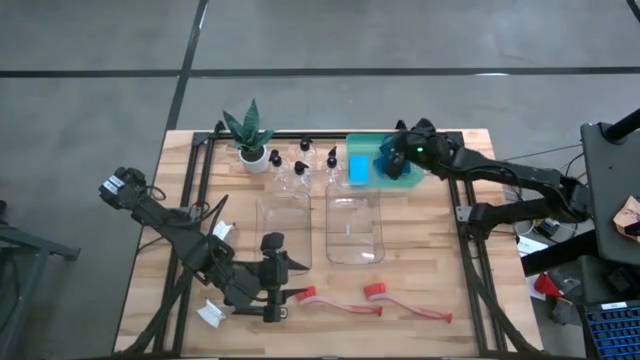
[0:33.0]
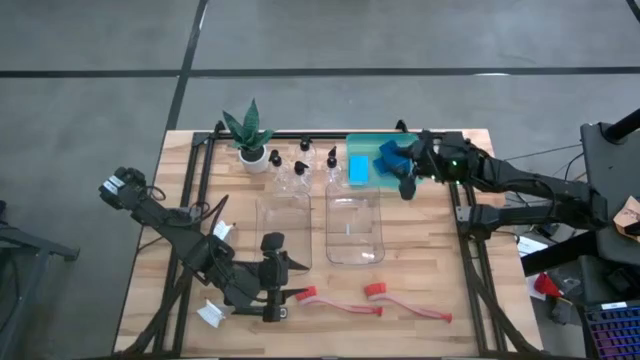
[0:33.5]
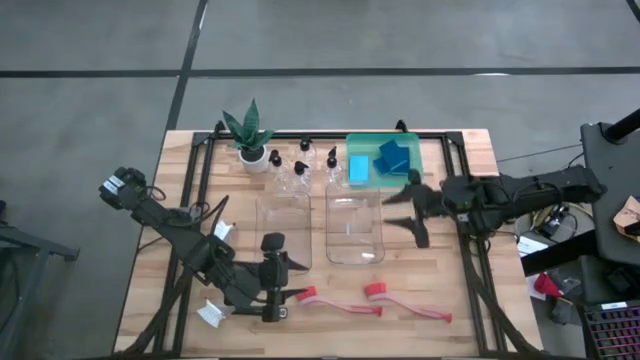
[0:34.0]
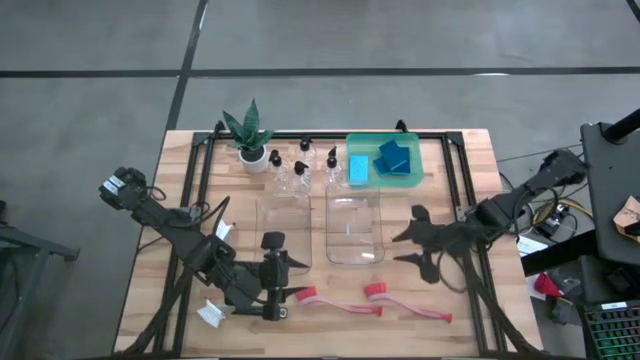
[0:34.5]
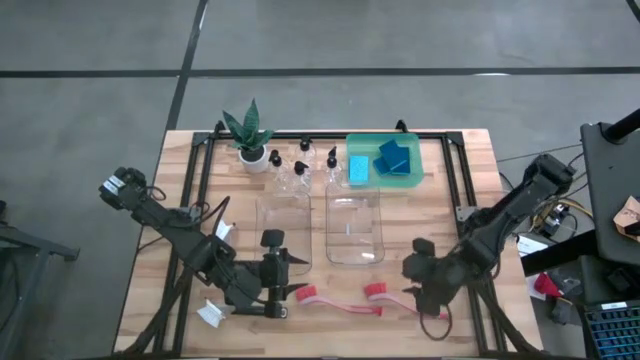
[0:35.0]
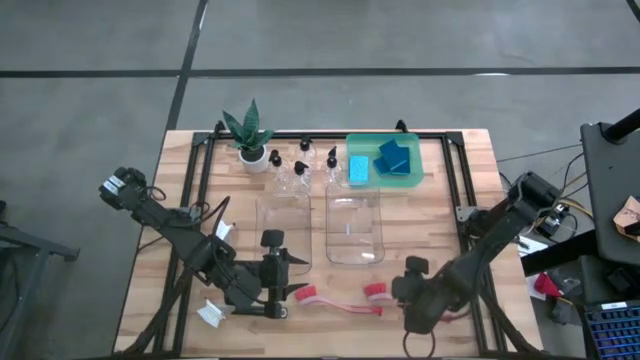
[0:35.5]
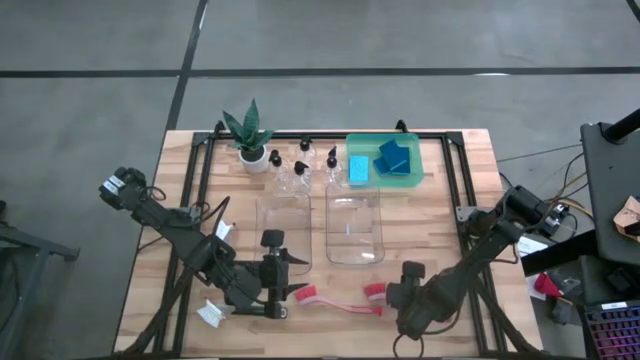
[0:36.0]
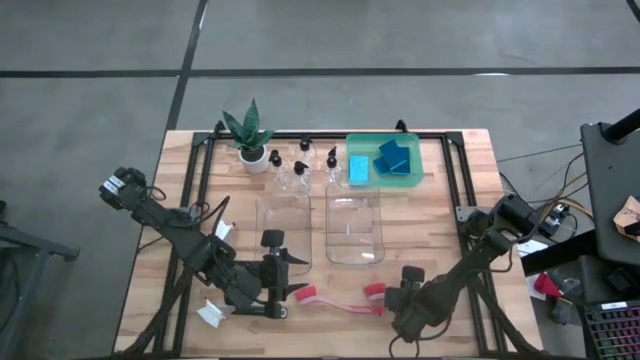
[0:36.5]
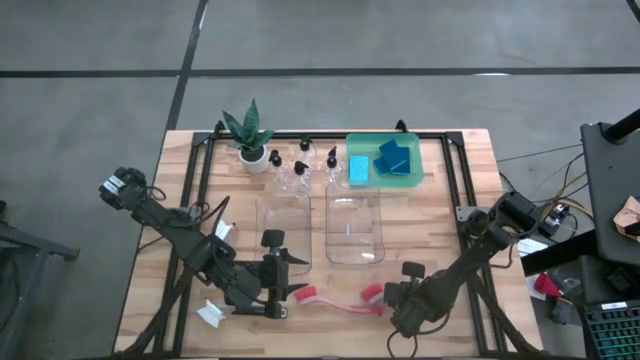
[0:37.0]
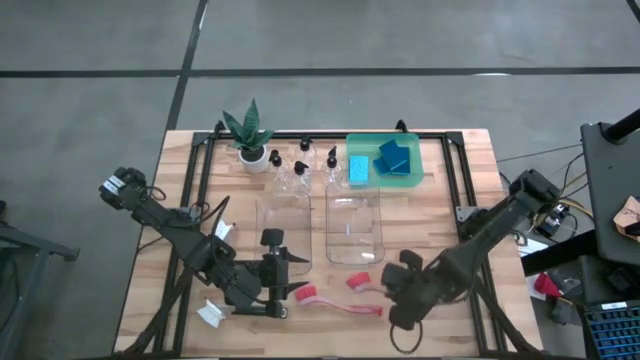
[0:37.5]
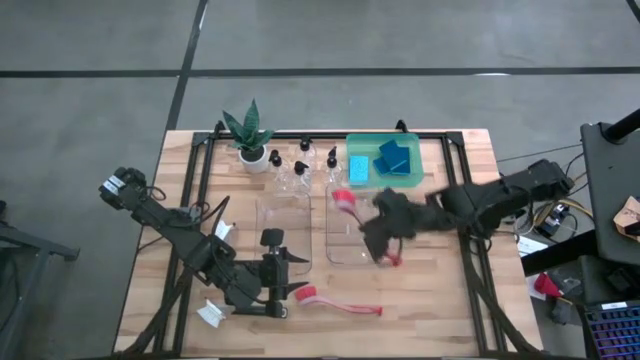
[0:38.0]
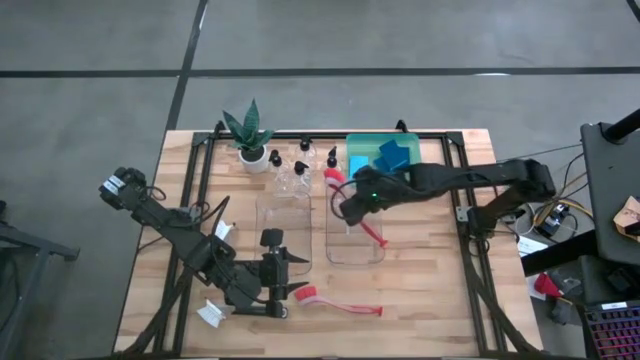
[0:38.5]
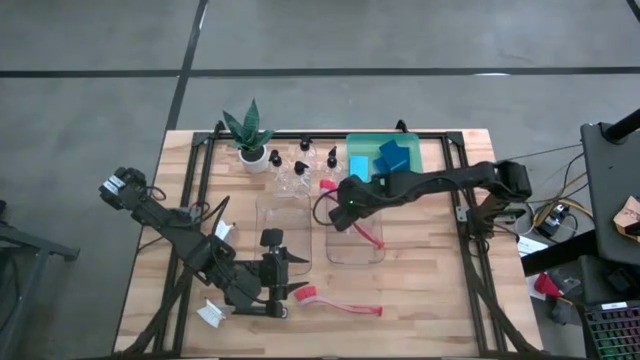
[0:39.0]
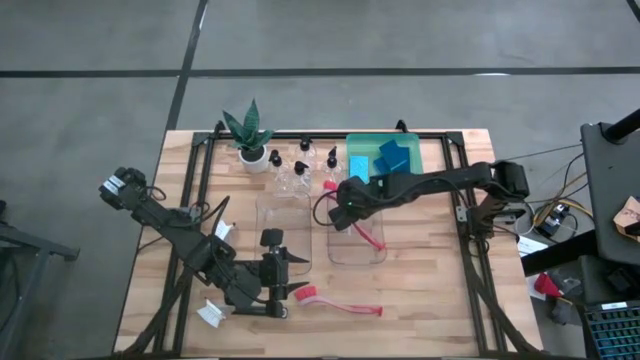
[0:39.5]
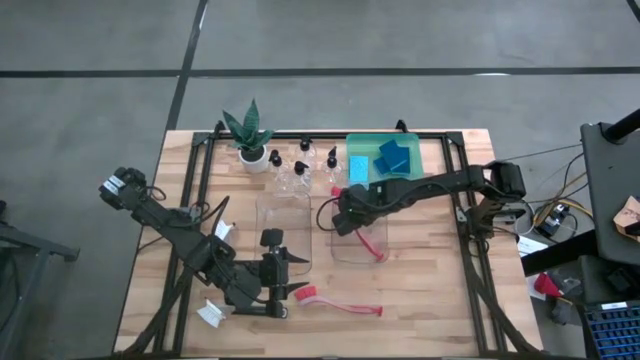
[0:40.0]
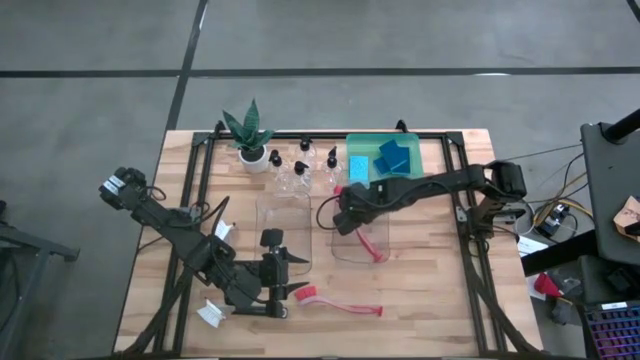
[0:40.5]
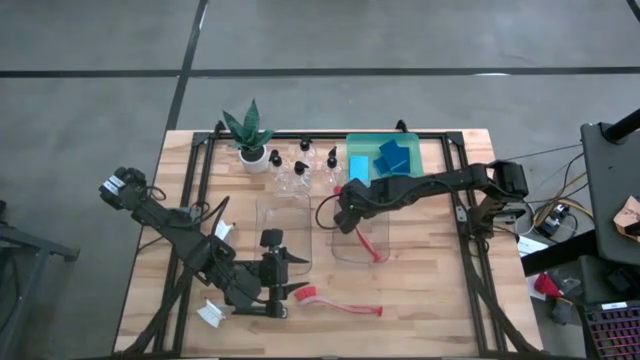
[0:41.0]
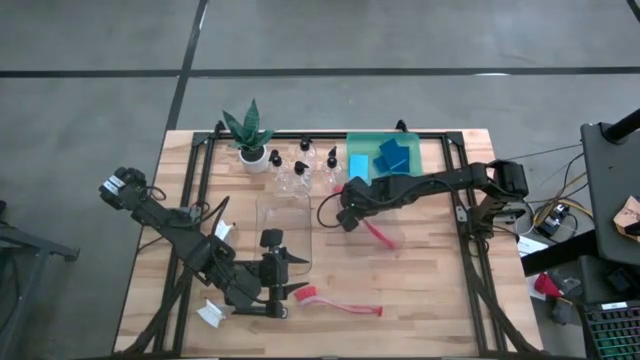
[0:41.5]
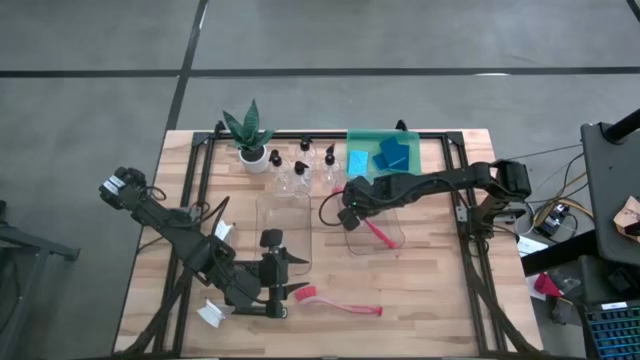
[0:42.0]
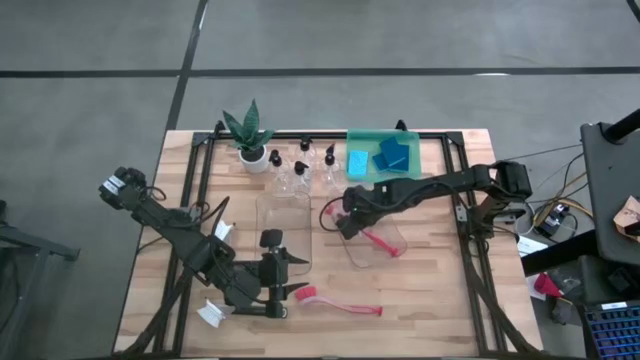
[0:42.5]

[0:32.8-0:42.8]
Task: Pick & Place Kitchen Sink Supplies
Put the red dish brush into the right transparent bin

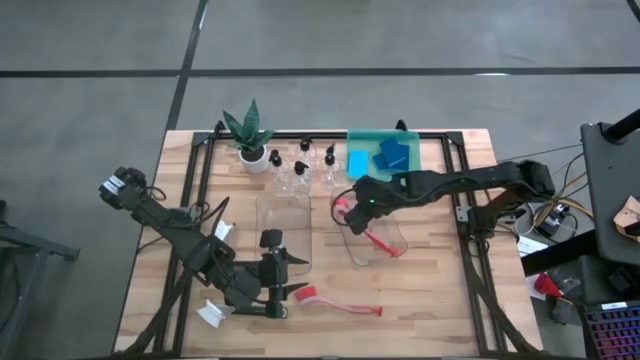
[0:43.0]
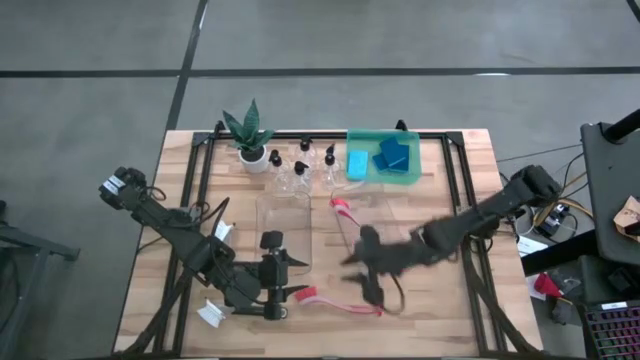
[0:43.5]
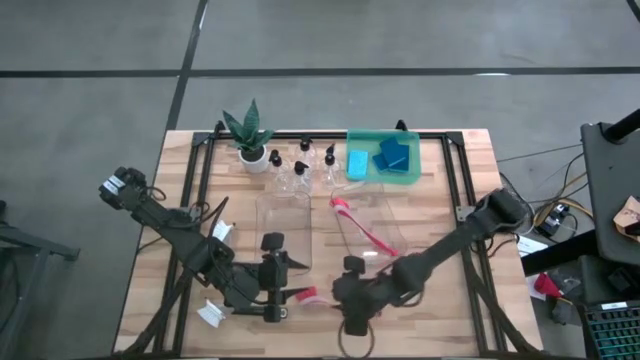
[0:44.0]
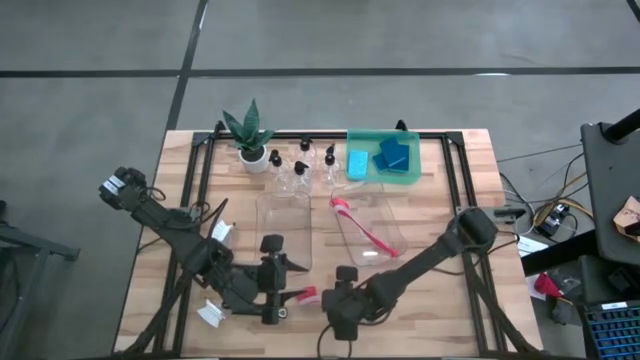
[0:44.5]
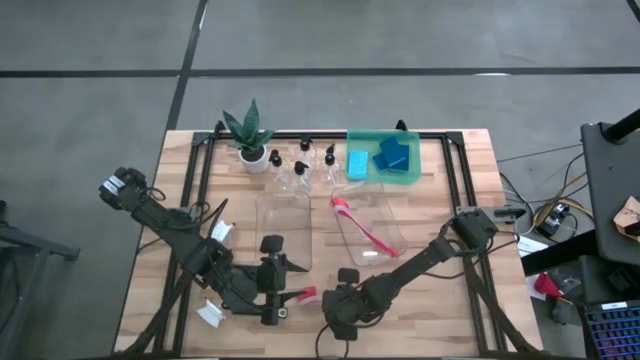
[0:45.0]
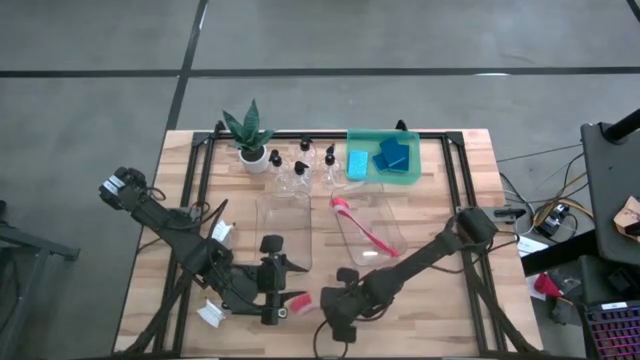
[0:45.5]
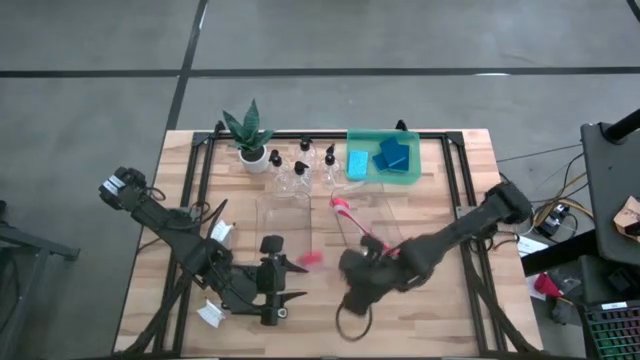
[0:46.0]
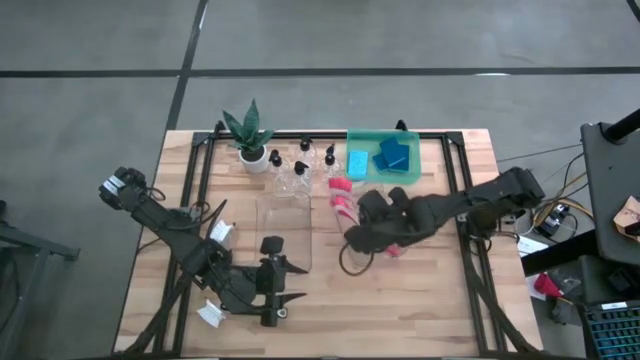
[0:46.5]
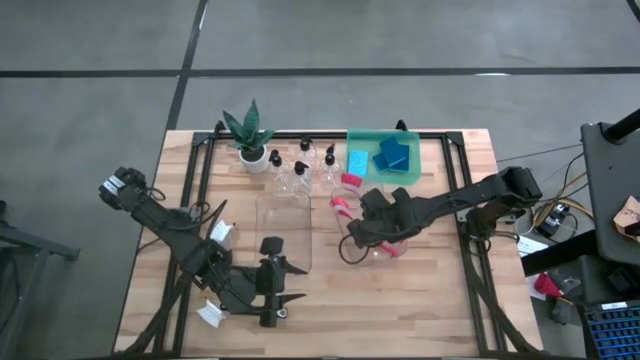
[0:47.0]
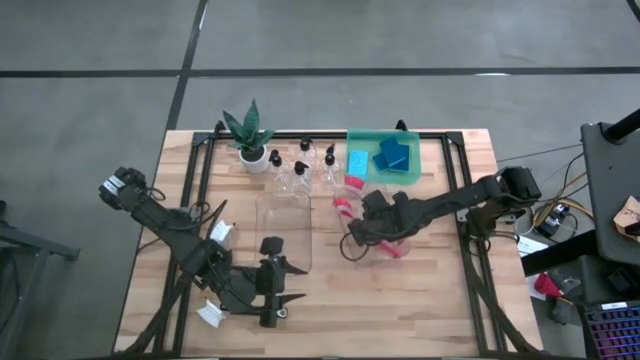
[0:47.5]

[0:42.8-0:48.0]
Put the red dish brush into the right transparent bin

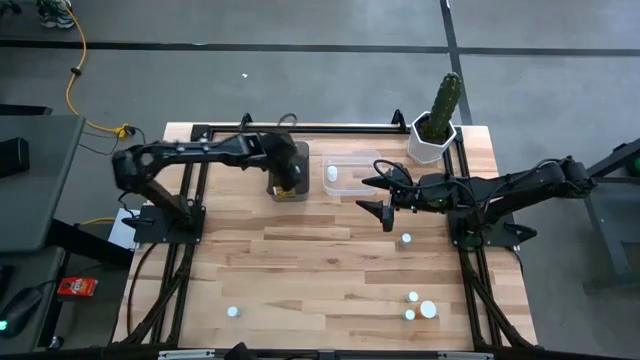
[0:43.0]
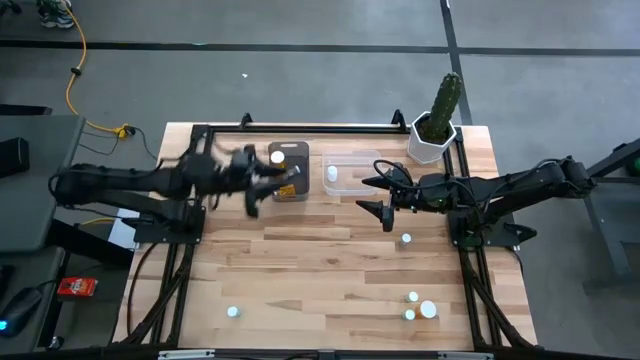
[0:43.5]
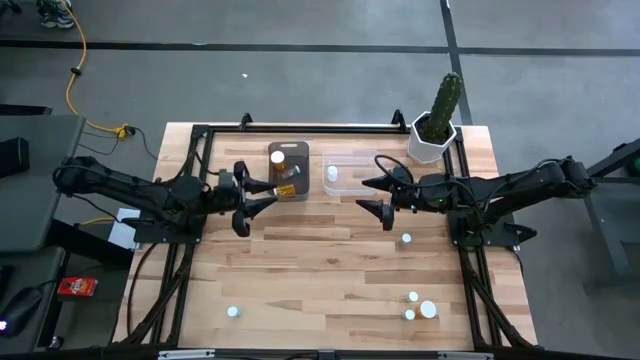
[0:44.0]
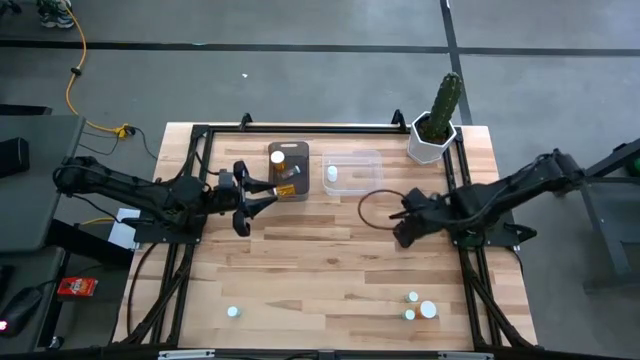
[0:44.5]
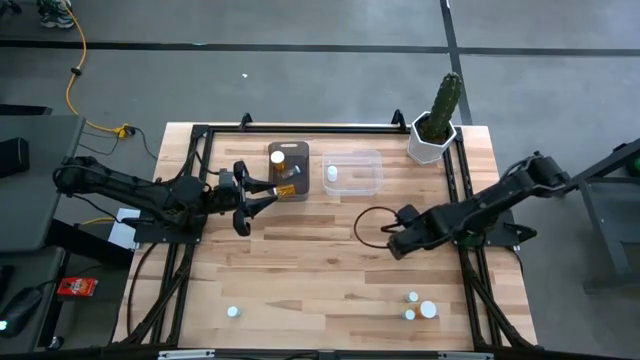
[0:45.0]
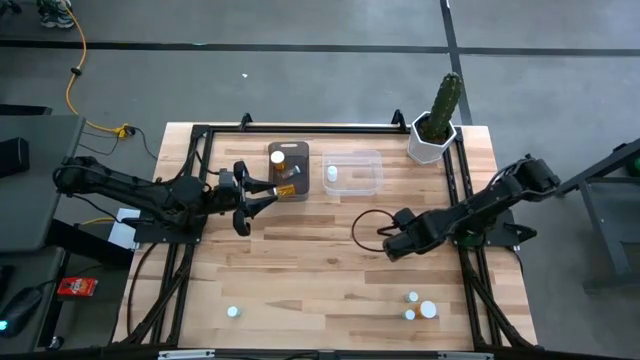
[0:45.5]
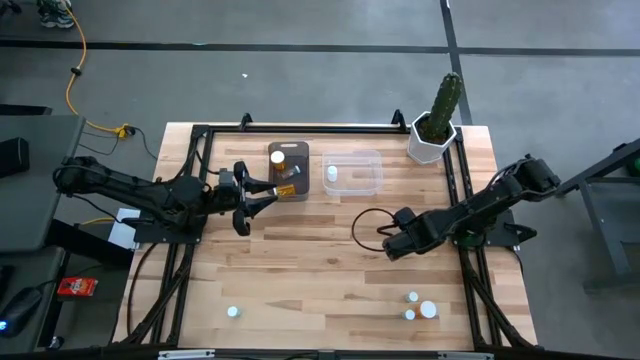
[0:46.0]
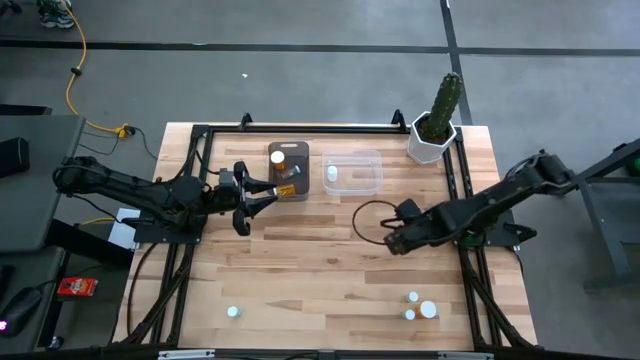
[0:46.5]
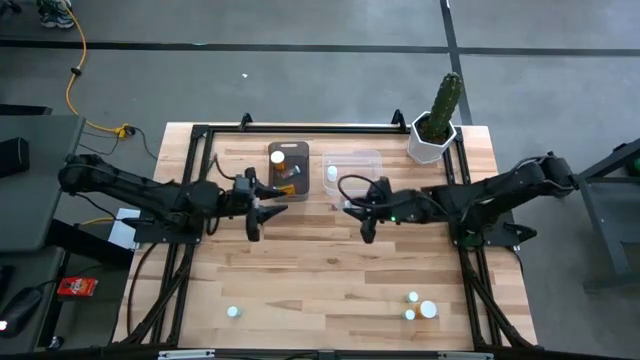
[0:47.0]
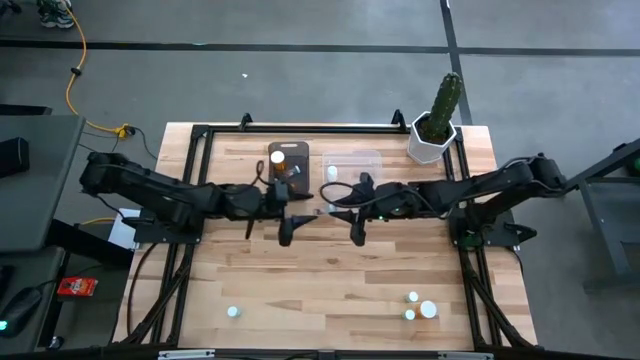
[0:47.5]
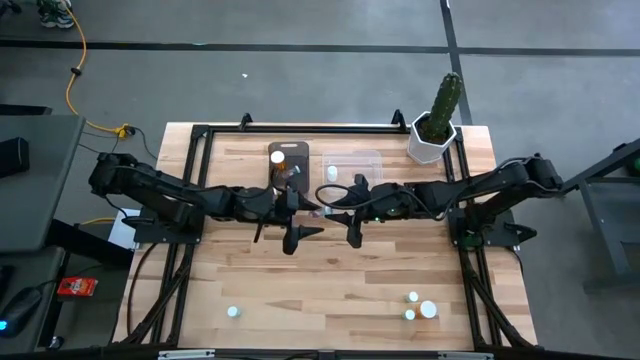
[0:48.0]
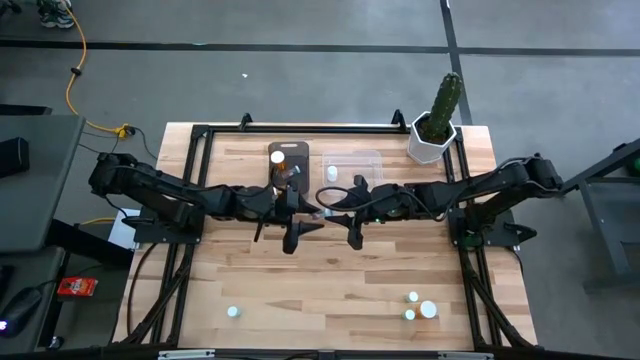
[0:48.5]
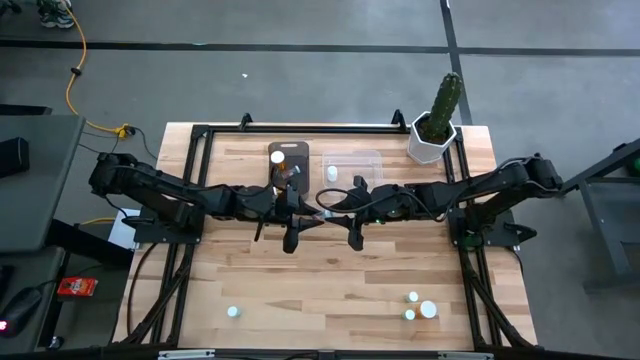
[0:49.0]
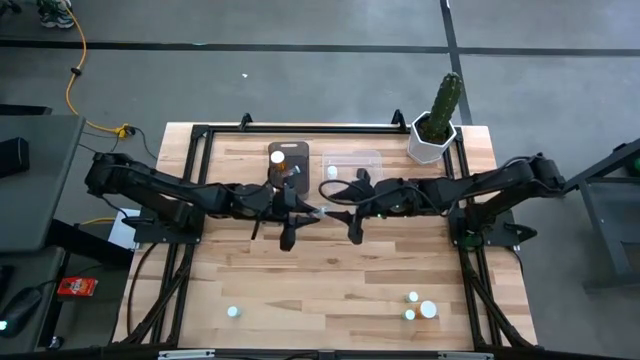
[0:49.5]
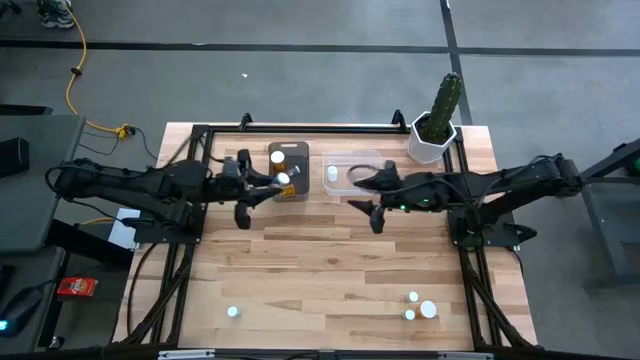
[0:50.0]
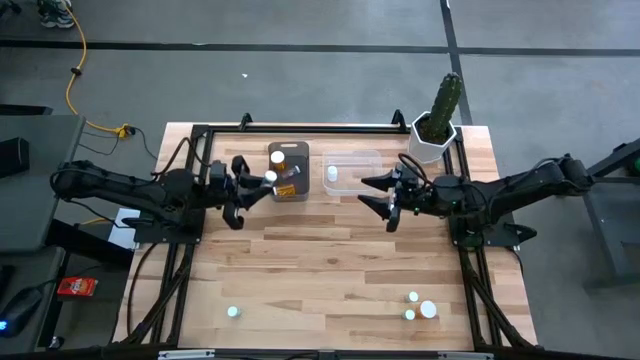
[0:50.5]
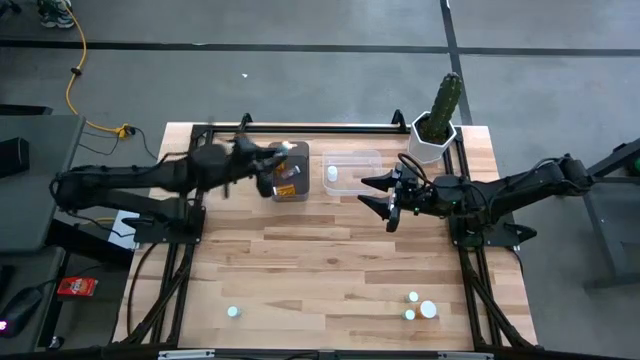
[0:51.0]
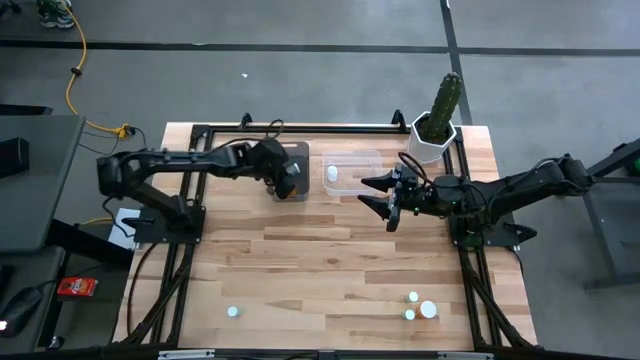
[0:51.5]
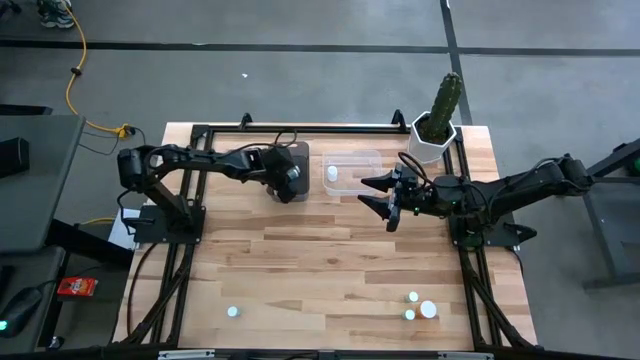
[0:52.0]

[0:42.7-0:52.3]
Task: Pick and place medicine bottles into bin by pill shape (circle, oval)
Put the green transparent pill bottle into the black transparent bin
